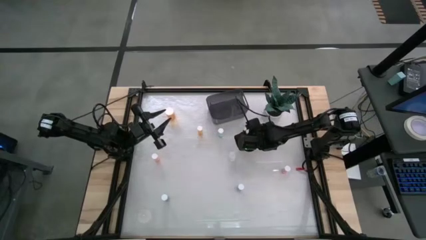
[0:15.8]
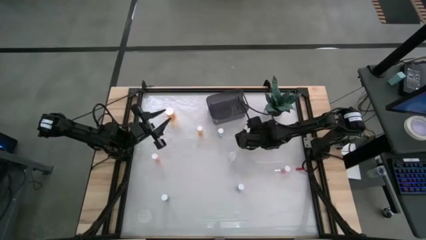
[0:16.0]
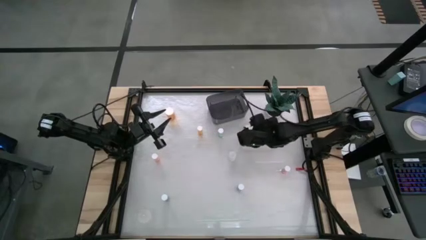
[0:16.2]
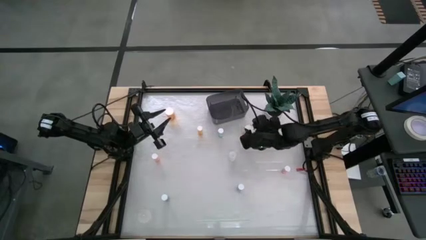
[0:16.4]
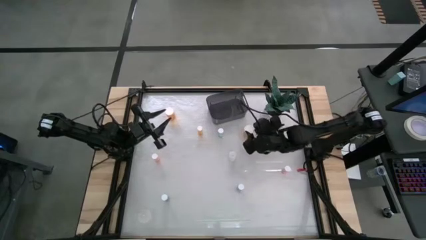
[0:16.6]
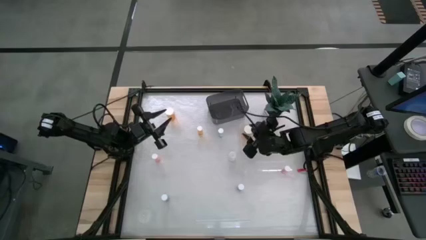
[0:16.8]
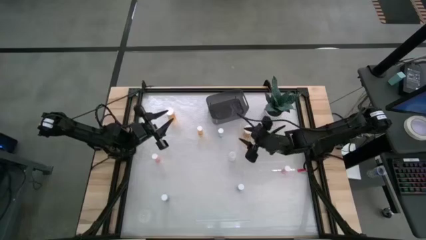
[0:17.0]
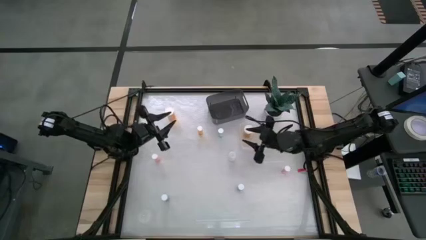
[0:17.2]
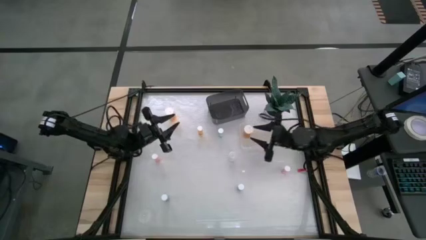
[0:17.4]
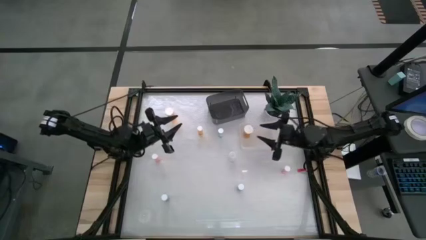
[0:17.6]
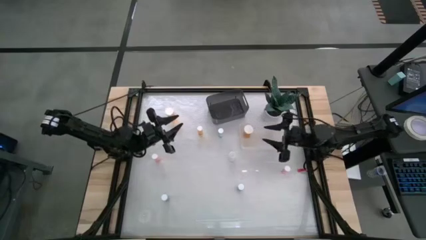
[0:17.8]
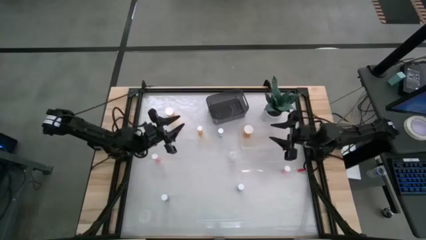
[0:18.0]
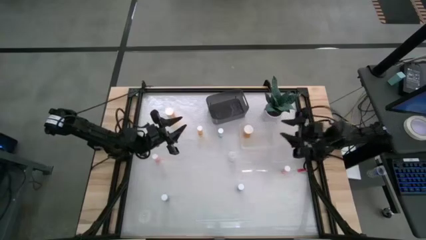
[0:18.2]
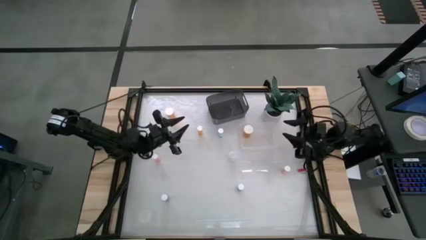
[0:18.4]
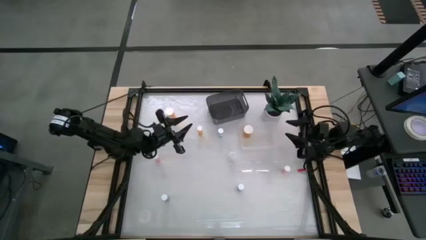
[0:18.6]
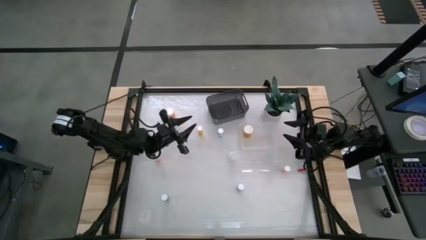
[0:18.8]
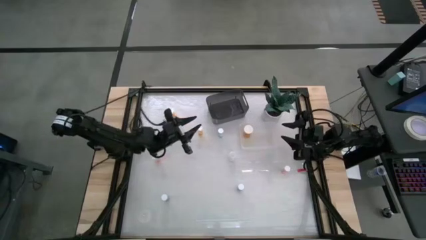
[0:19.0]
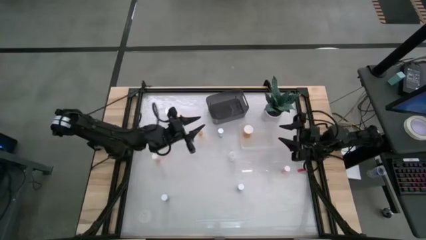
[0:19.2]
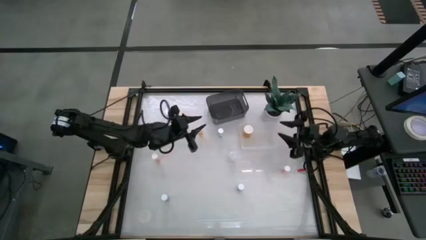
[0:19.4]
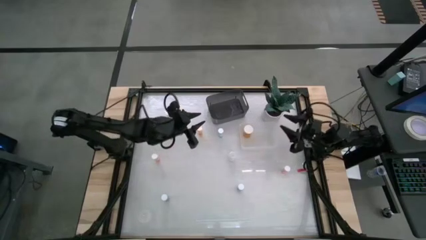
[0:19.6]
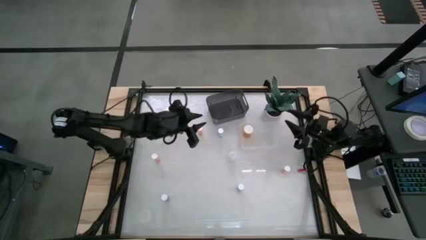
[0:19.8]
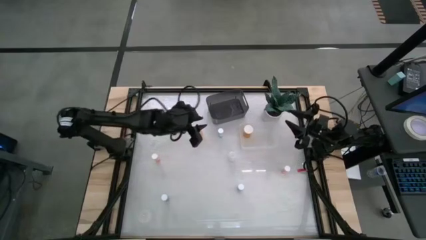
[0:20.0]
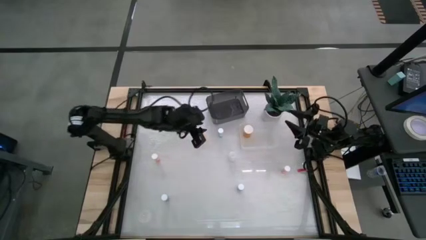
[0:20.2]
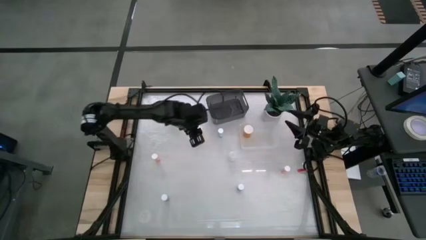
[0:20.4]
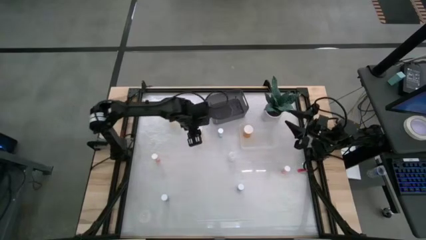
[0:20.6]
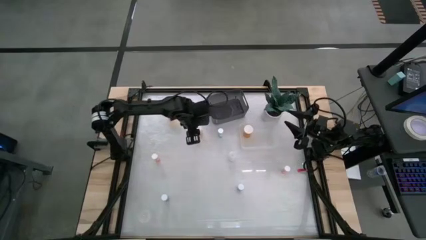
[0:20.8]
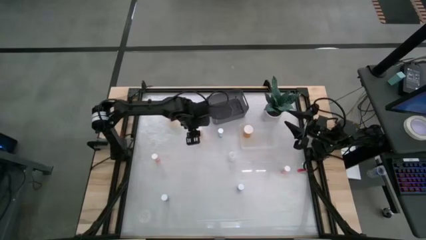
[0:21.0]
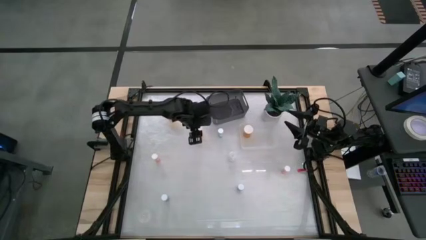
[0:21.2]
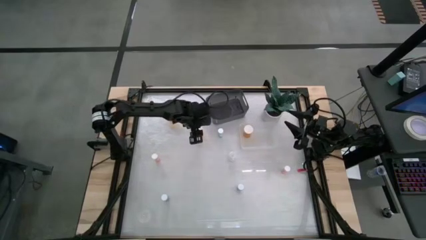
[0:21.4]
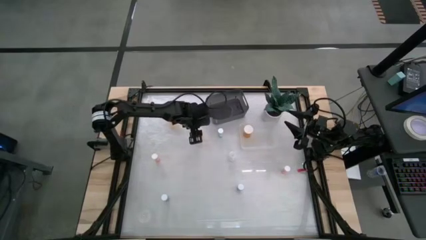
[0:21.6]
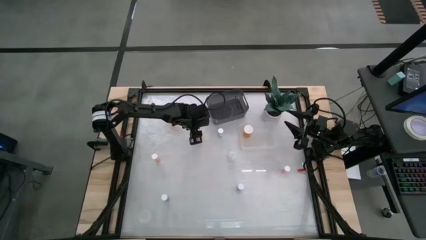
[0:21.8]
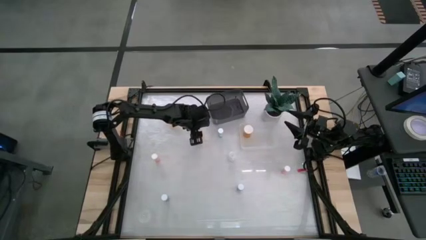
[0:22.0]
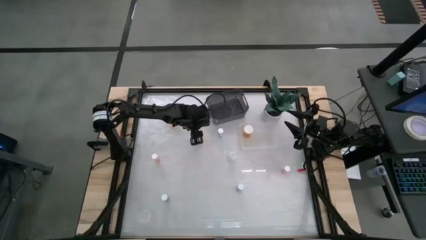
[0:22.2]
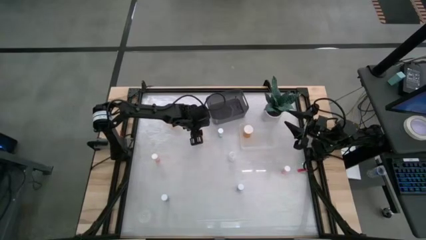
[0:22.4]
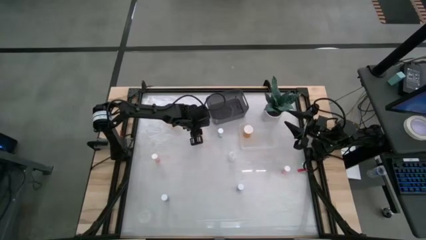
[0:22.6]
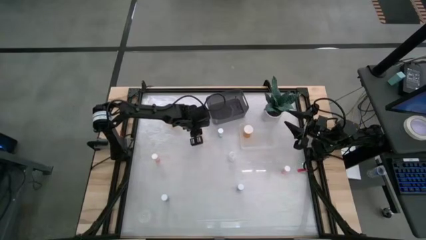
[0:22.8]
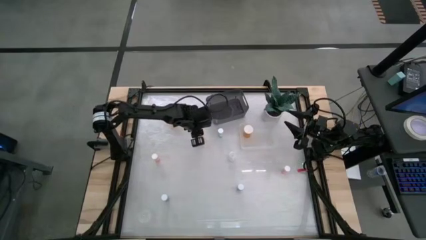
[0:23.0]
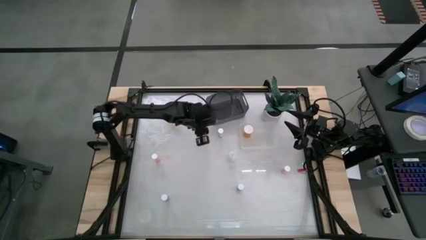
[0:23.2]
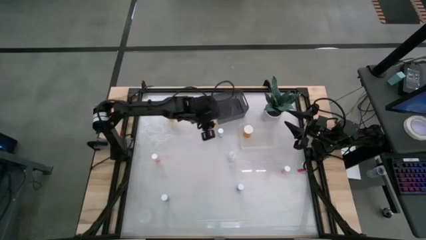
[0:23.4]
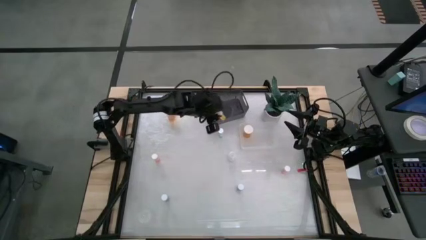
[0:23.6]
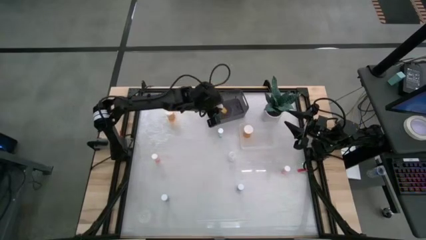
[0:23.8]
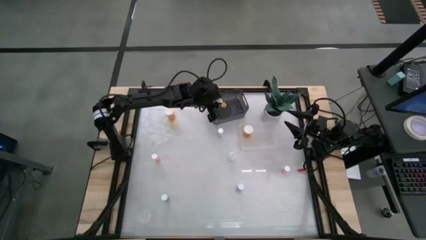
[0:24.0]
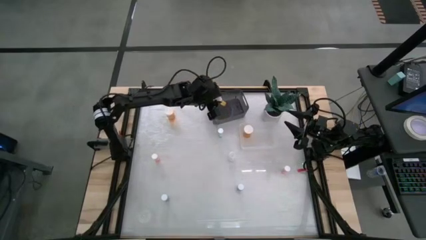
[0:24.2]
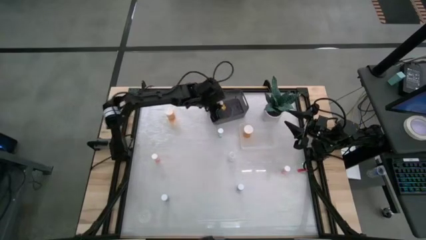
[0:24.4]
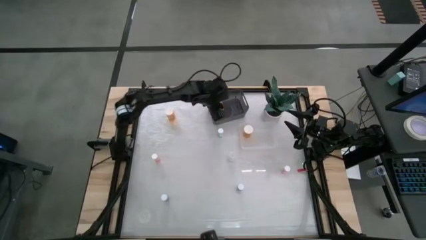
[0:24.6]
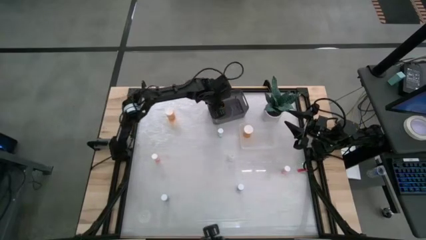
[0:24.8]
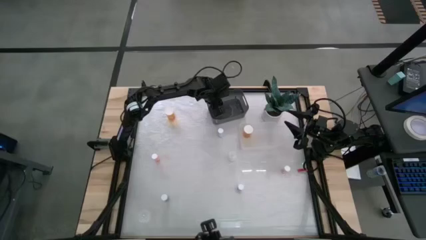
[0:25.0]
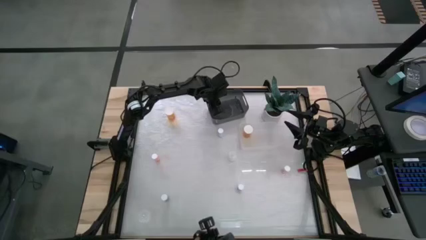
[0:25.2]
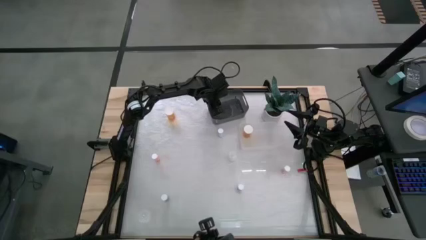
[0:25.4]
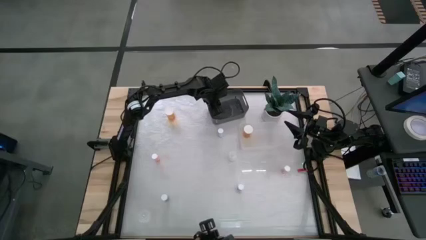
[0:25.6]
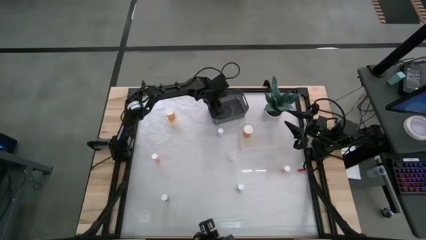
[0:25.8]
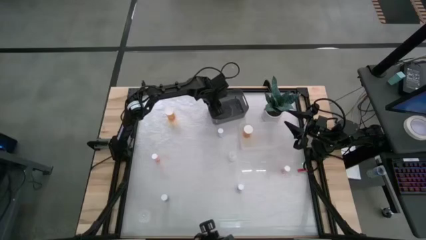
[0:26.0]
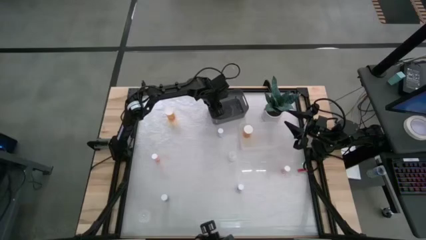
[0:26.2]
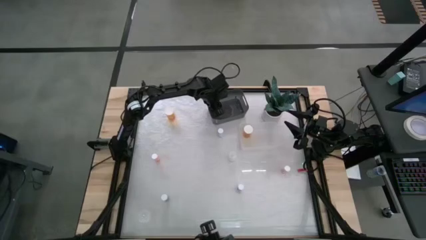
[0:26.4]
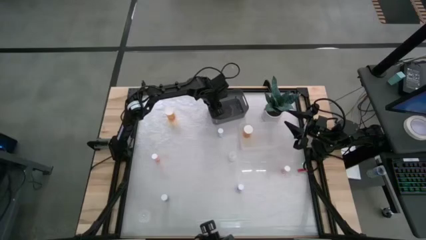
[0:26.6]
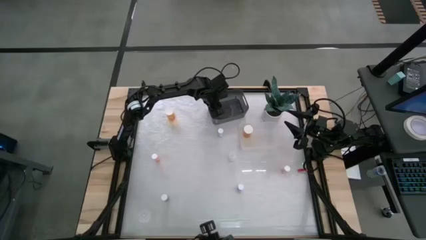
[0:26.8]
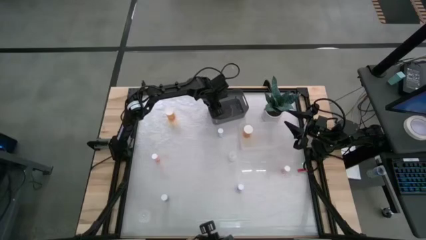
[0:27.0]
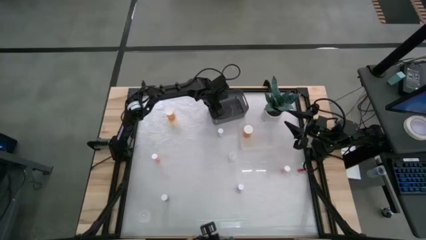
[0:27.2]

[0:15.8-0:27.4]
Task: Pick and place medicine bottles into bin by pill shape (circle, oval)
Put the small yellow pill bottle into the black bin
